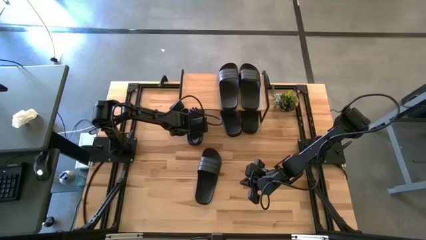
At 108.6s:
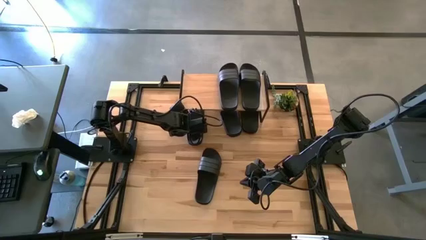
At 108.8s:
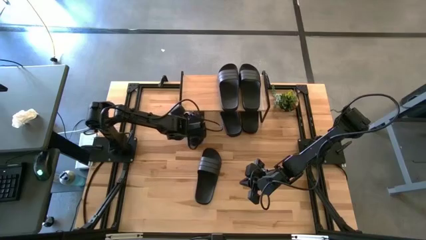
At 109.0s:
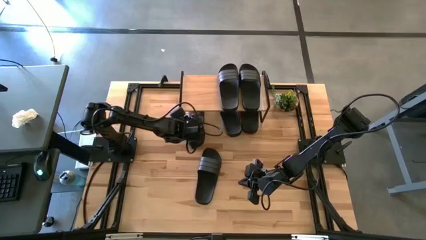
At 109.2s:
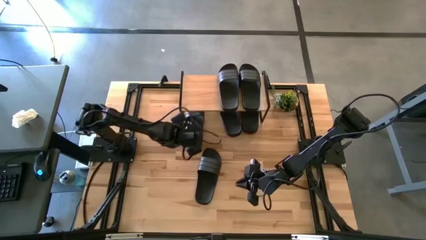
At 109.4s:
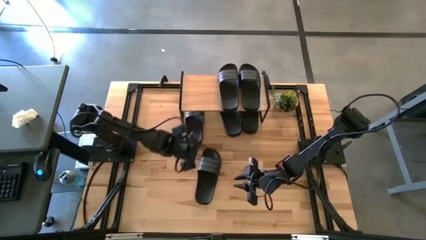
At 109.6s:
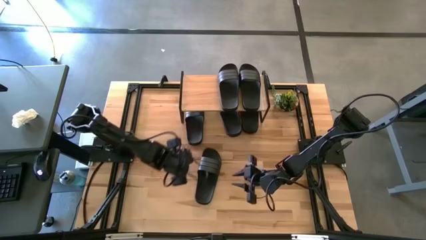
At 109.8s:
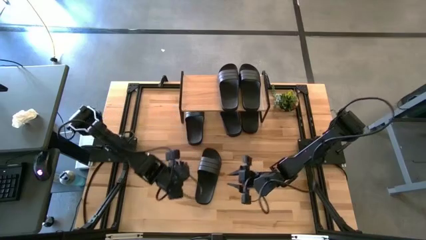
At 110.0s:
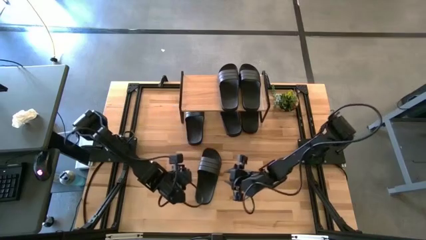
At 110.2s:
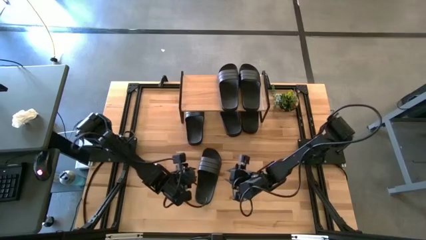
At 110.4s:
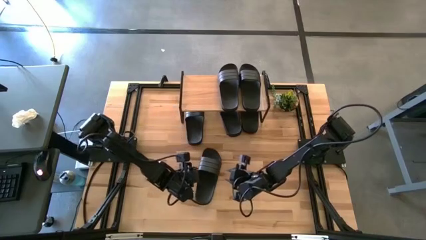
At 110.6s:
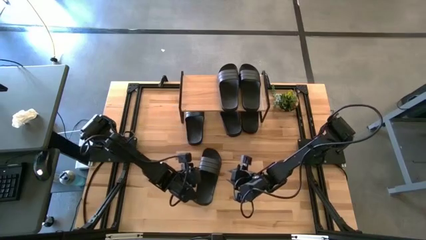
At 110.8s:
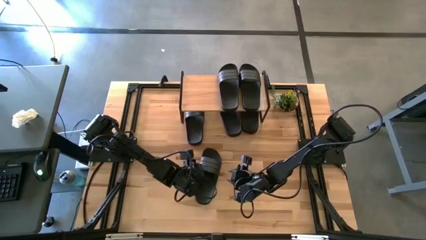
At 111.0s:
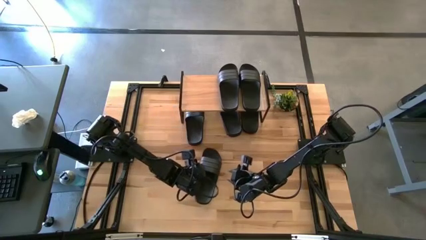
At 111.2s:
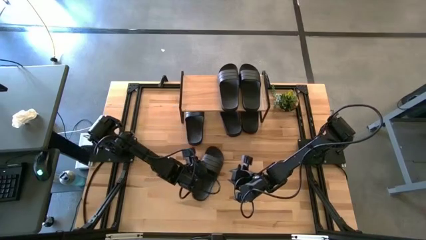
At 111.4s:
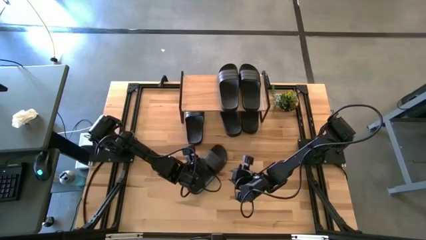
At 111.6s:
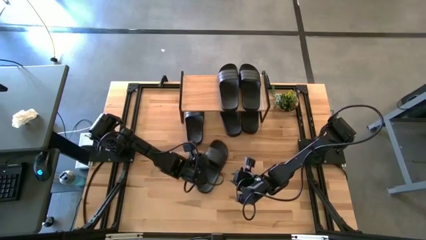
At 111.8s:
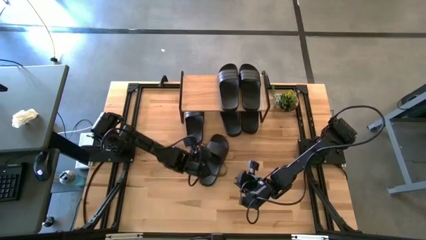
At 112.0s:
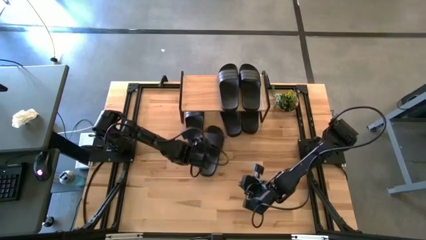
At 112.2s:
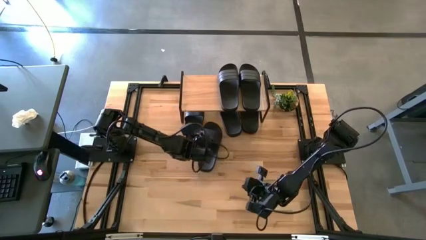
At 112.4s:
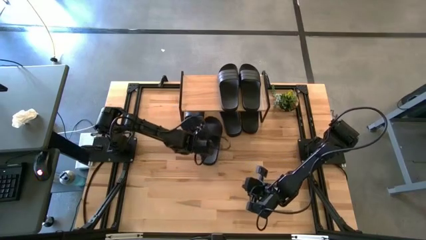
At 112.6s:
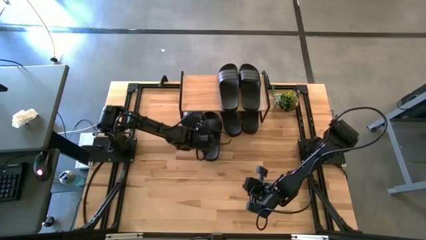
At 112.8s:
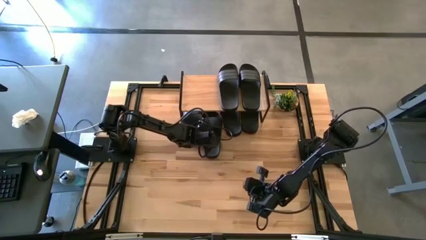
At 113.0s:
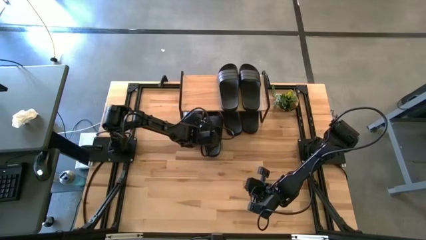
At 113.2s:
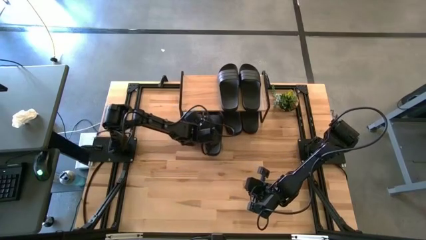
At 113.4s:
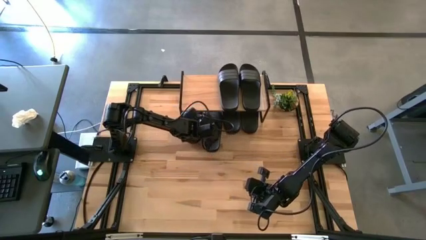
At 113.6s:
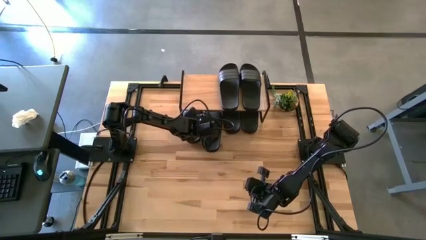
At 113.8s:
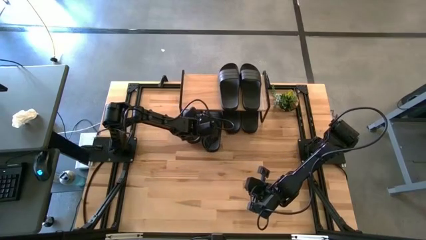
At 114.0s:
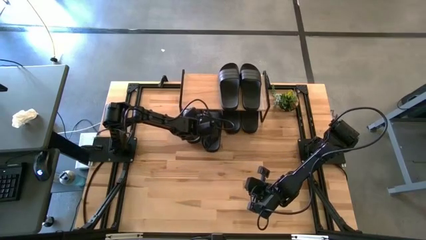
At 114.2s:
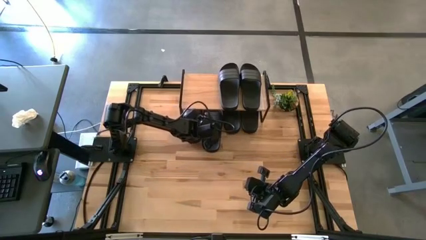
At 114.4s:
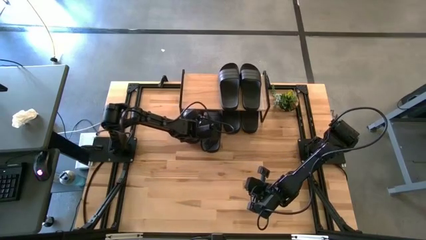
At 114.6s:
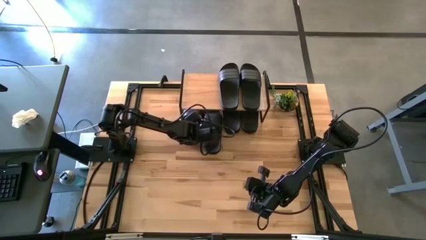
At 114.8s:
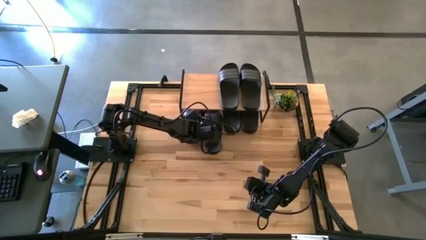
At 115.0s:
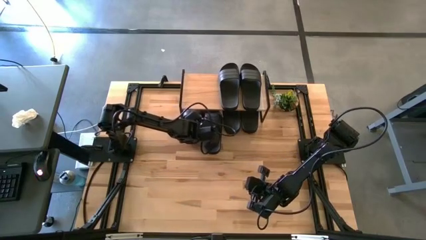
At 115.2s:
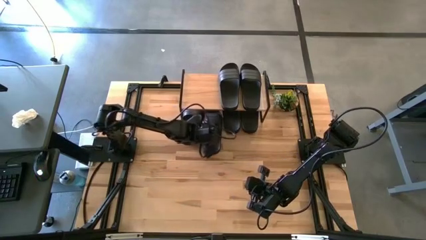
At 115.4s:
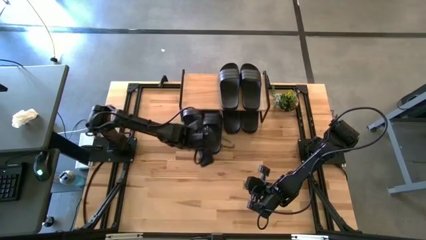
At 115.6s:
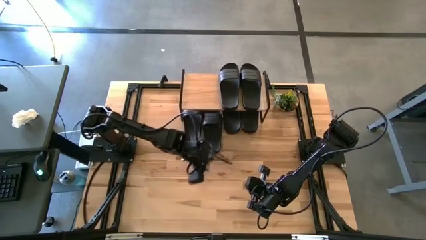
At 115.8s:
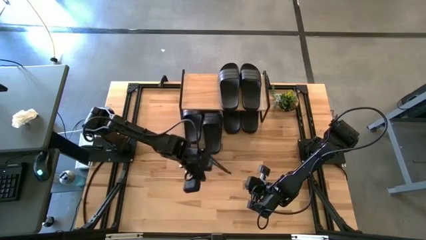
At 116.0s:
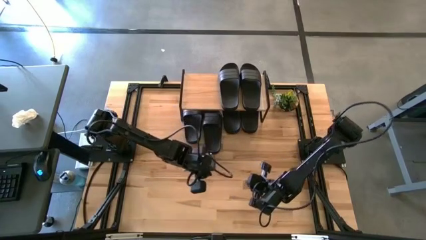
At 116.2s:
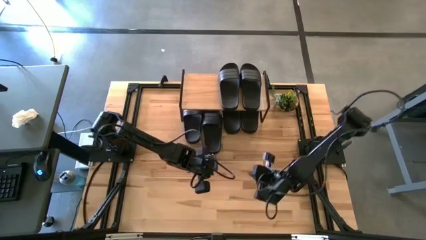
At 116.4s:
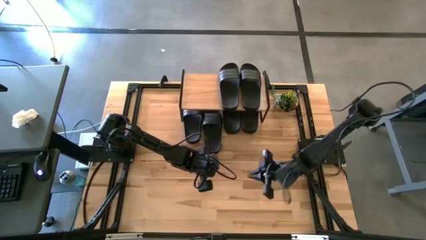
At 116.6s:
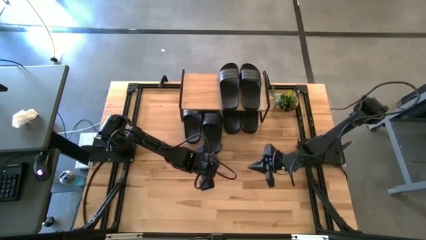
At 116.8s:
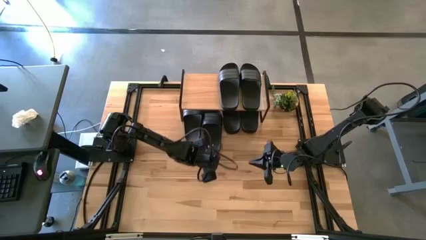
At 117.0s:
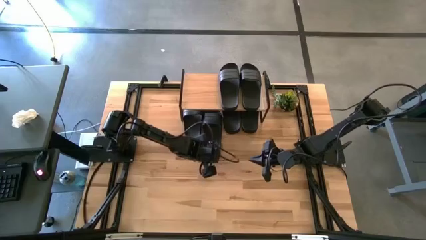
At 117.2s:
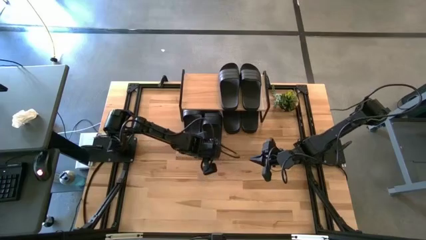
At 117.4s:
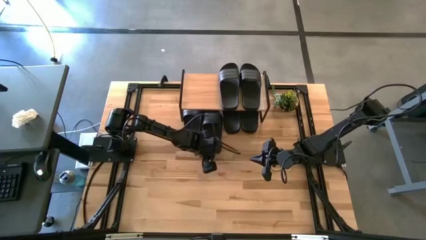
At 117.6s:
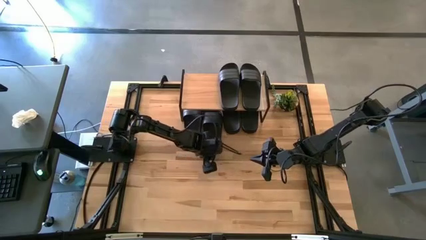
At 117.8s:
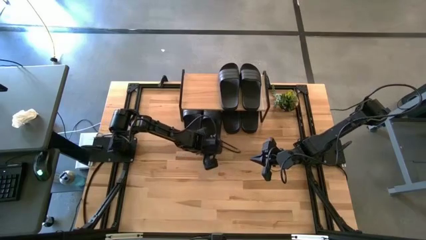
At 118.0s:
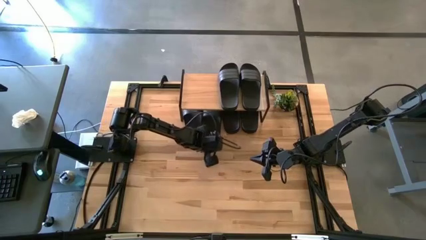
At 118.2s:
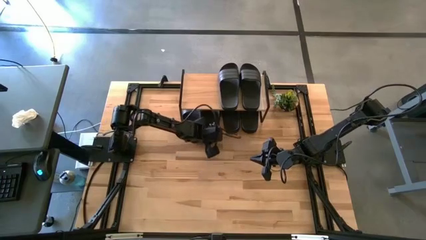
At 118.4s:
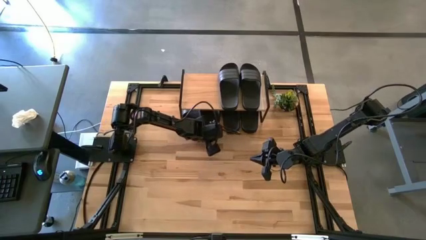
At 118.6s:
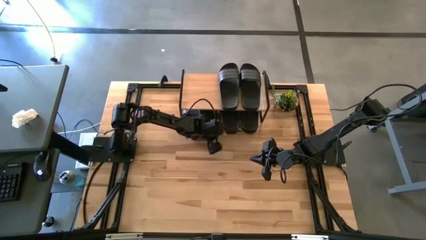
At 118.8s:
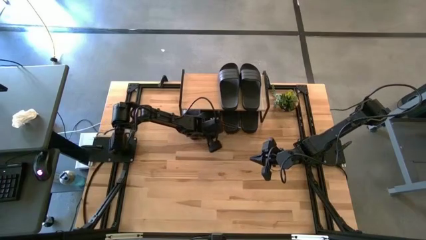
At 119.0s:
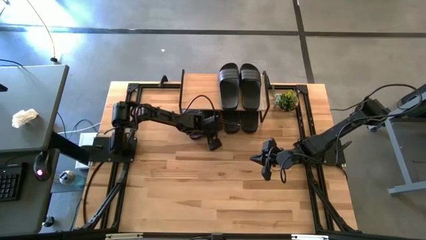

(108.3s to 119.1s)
Task: Pick and place slides into the shelf
Put the black slipper under the shelf

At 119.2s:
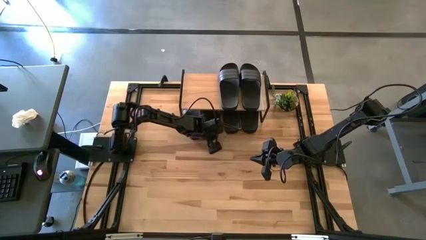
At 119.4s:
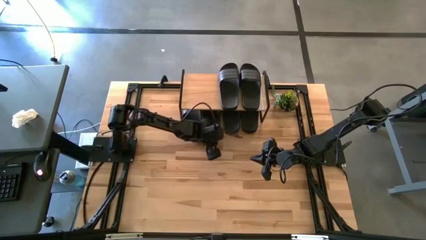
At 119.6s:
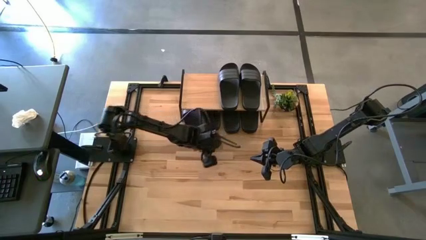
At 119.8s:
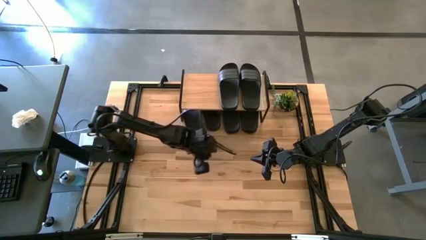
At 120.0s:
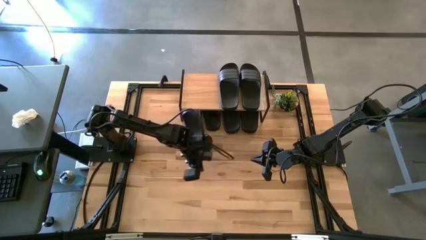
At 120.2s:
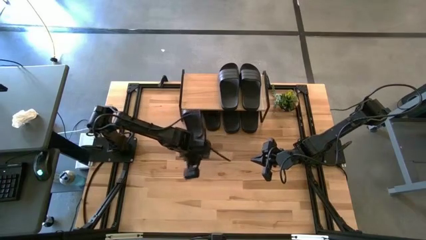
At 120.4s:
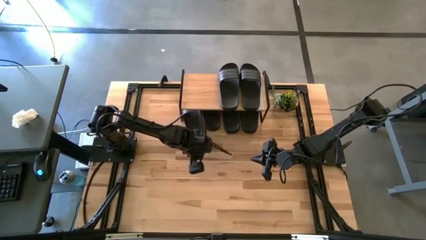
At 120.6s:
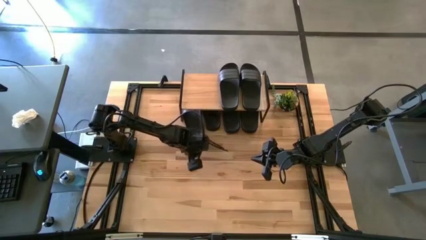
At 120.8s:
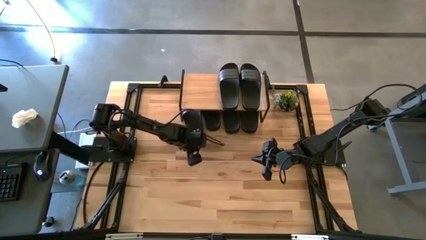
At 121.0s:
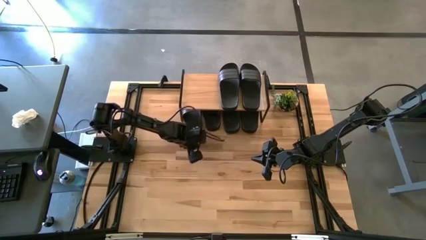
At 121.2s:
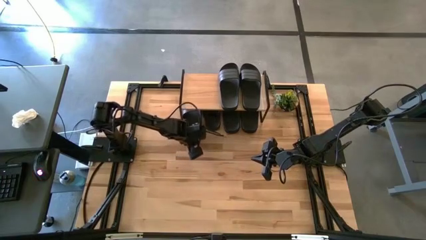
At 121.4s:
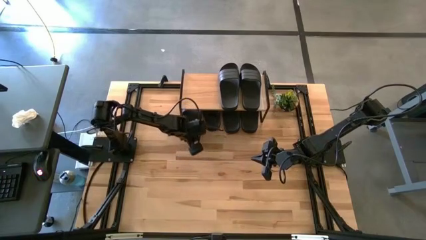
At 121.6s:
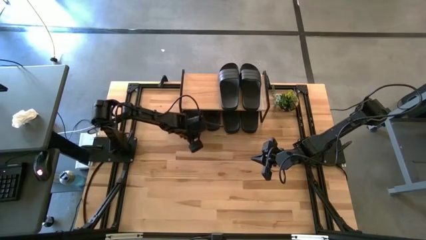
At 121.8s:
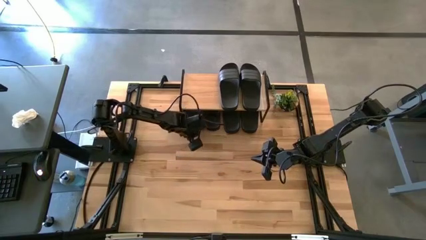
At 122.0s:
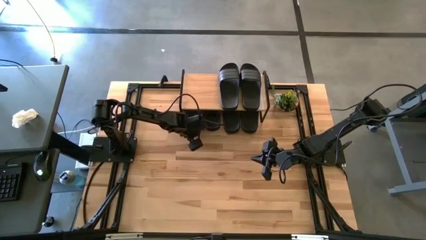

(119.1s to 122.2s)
Adjust the black slipper under the shelf
